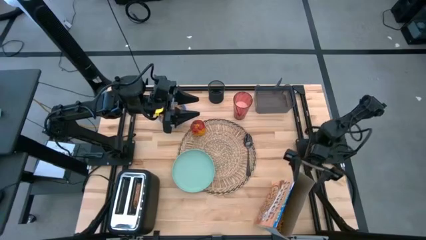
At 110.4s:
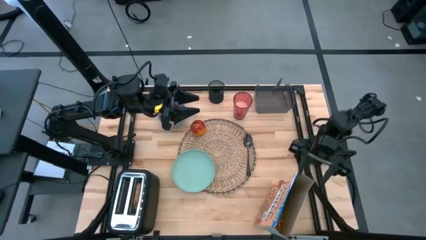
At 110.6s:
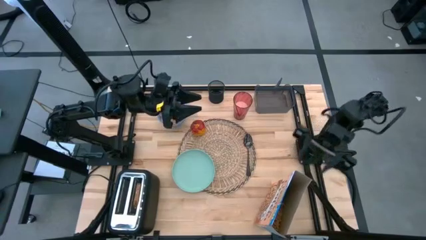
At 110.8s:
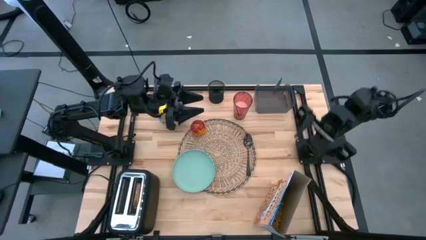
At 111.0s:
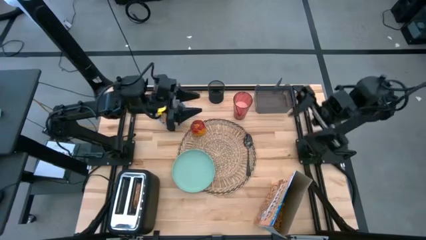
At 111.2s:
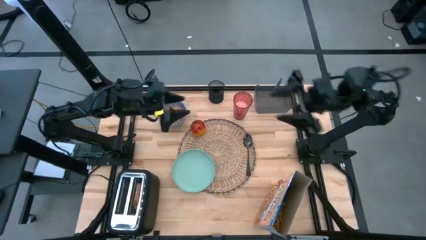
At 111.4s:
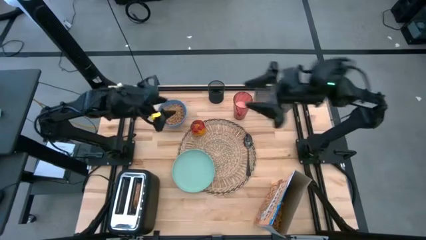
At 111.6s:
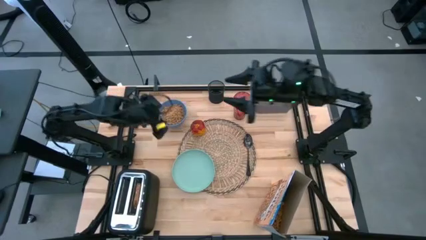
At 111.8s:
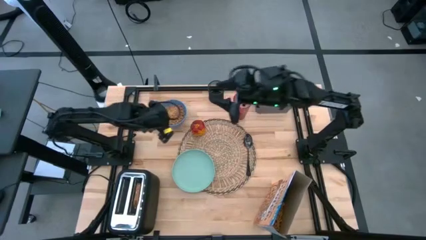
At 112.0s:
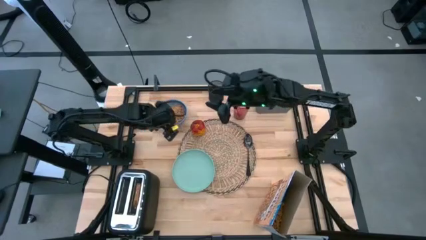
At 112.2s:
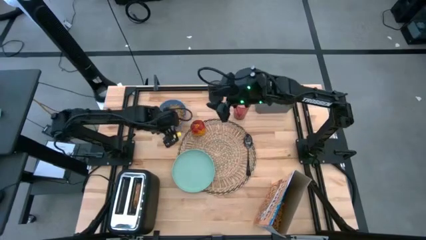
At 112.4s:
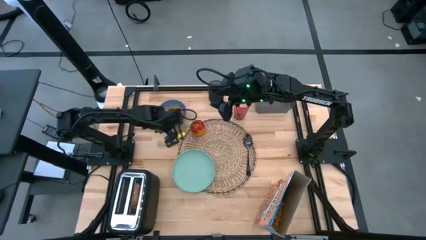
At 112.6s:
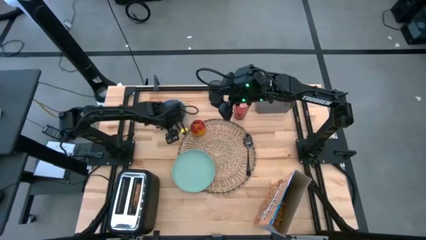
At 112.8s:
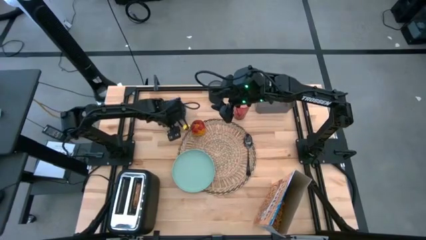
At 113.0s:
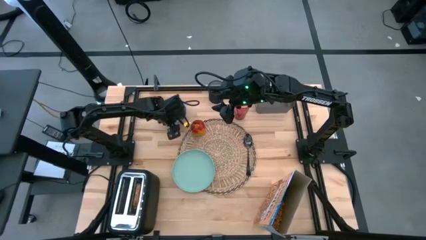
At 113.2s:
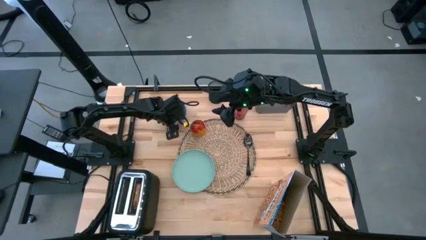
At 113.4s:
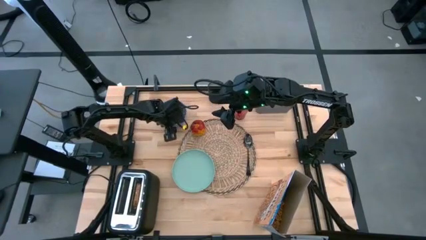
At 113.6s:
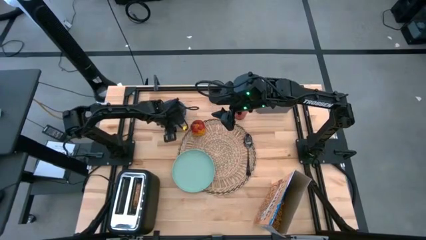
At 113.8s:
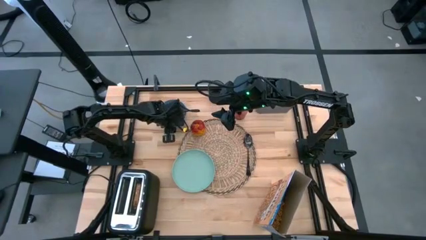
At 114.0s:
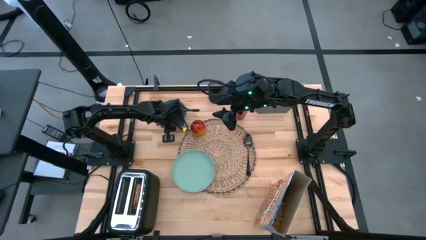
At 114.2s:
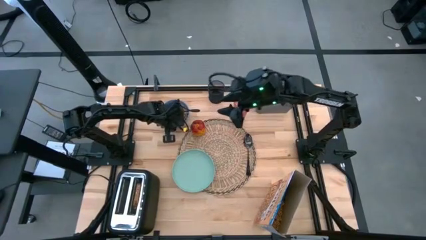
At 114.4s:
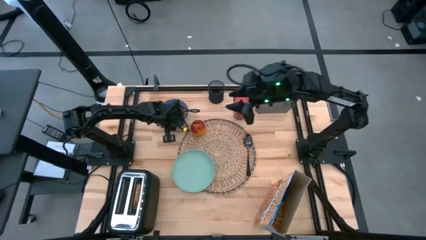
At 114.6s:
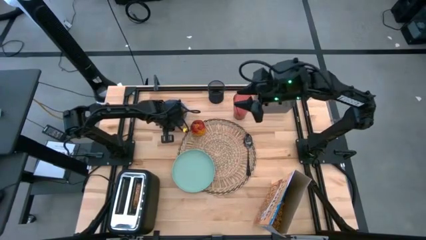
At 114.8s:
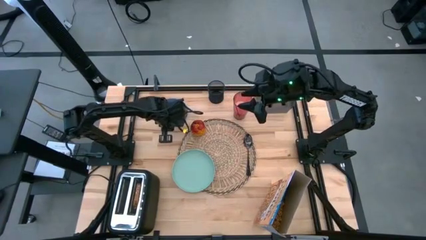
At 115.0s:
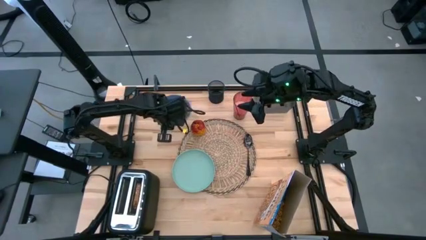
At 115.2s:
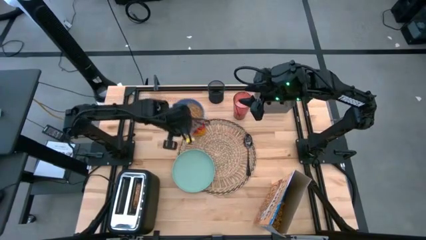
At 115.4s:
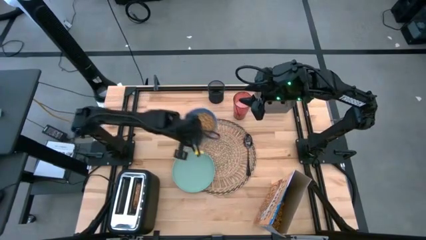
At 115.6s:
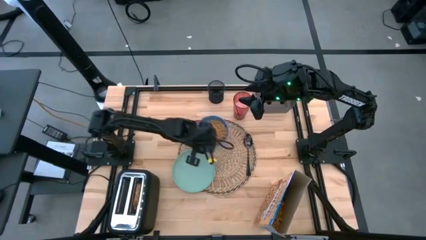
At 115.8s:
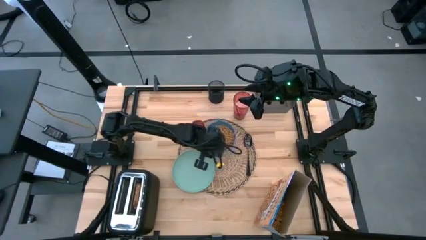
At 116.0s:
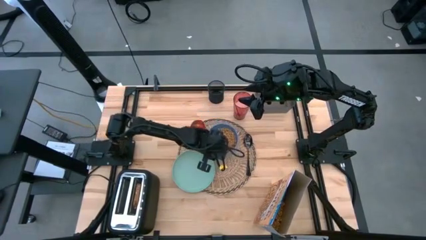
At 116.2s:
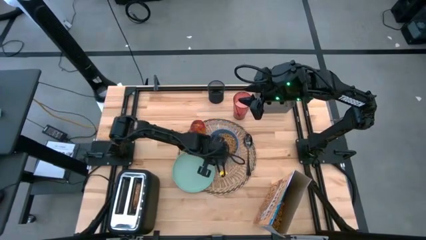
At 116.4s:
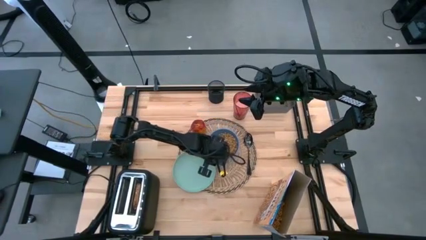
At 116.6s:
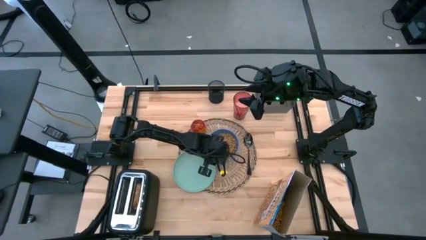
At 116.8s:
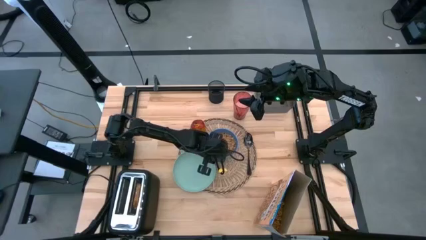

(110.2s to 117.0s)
Task: Arrange a breakfast setting
Put the blue bowl on the brown table mat

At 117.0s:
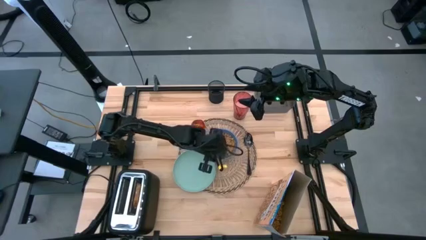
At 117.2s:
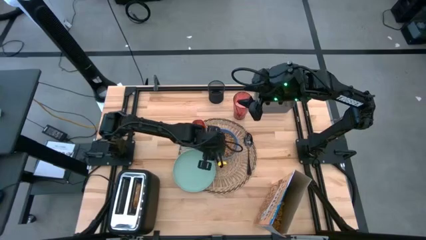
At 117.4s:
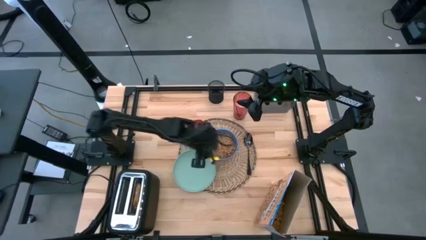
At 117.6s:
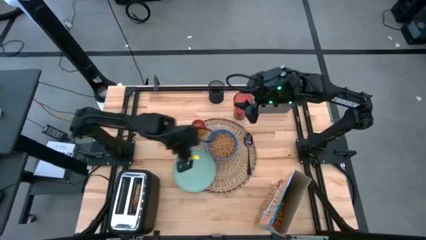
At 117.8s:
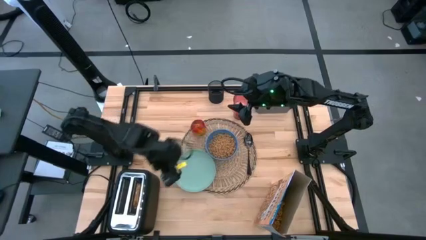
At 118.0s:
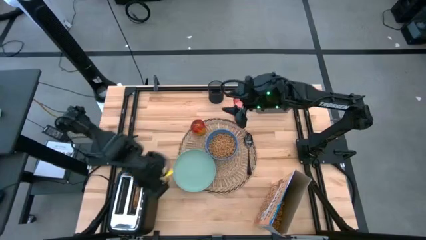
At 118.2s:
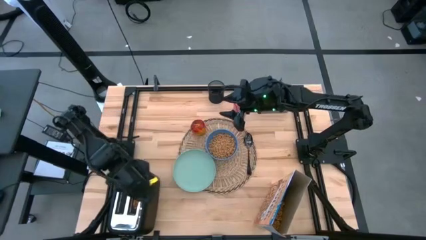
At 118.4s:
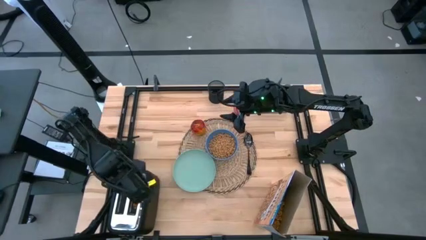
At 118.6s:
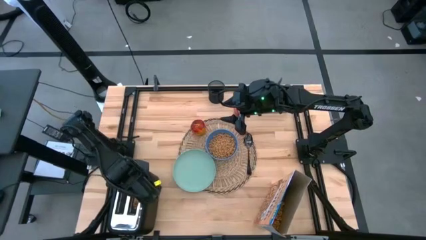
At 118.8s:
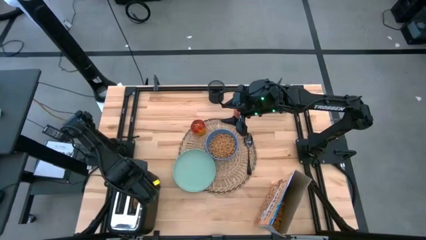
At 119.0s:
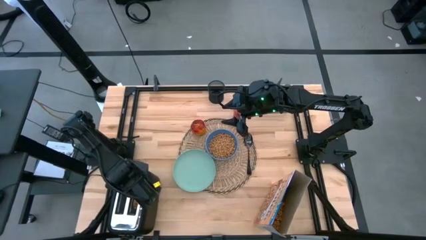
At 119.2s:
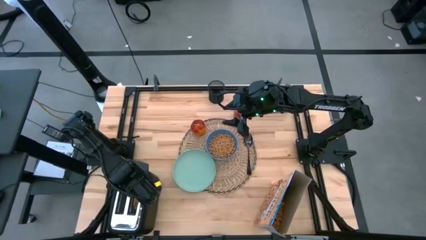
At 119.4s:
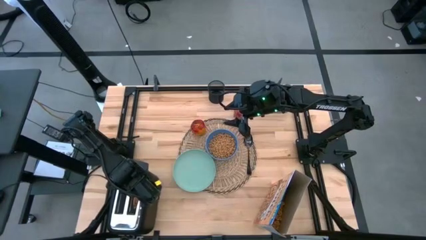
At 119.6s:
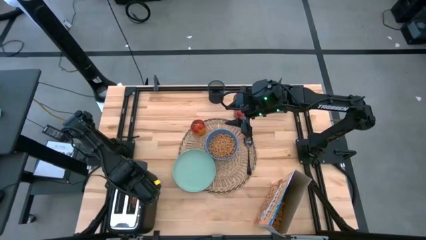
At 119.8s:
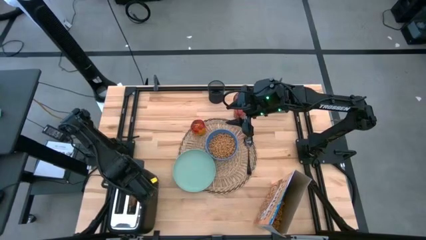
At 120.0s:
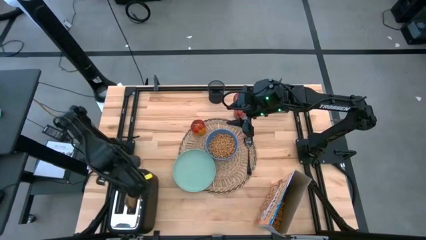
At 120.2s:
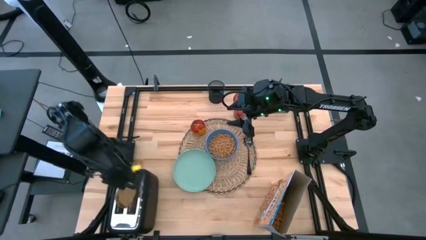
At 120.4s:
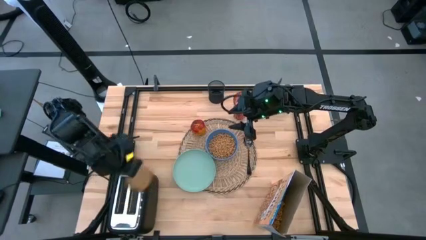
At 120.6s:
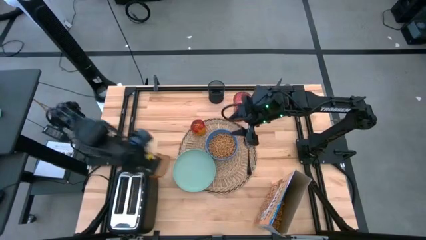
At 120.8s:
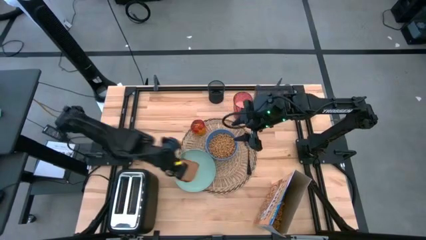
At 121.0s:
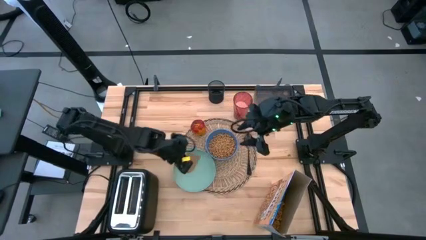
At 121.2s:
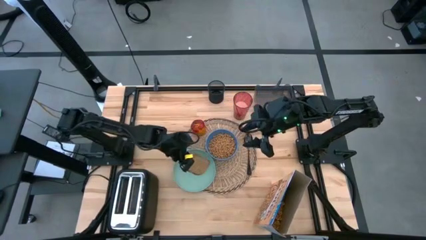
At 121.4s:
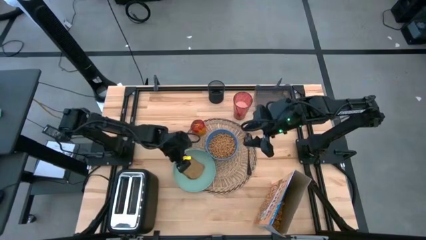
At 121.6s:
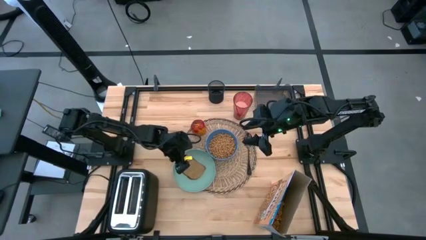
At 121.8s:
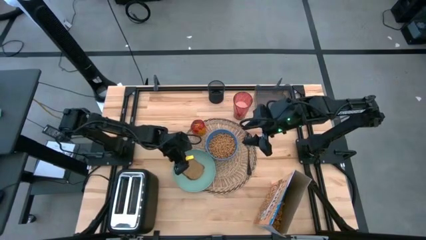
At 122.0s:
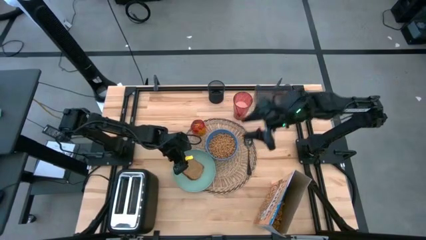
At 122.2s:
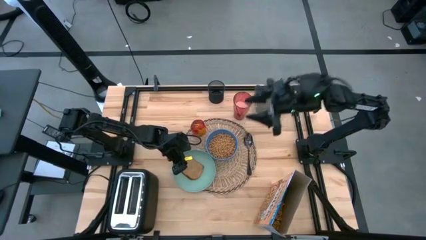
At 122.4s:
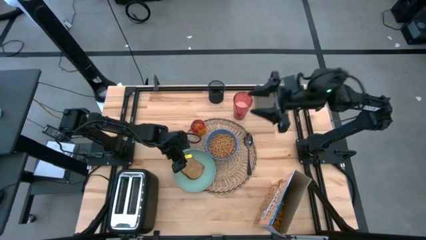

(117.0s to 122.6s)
Put the toasted bread on the light green plate

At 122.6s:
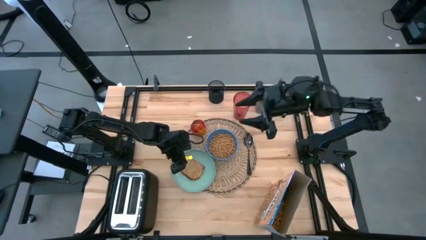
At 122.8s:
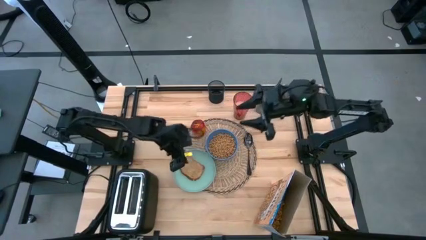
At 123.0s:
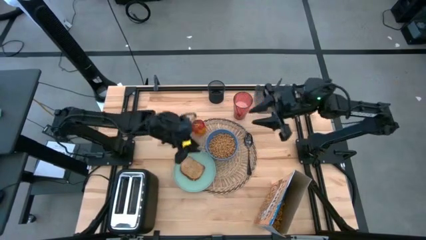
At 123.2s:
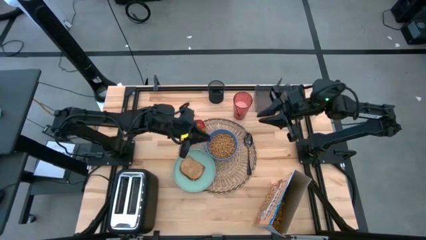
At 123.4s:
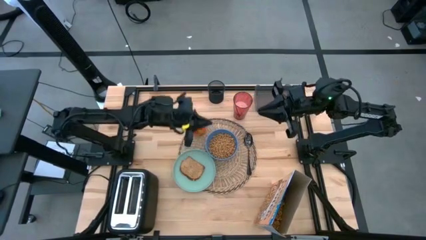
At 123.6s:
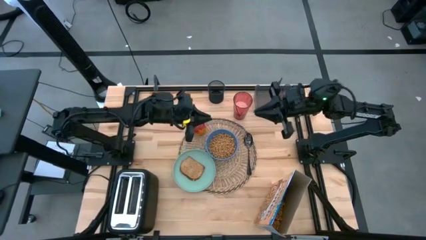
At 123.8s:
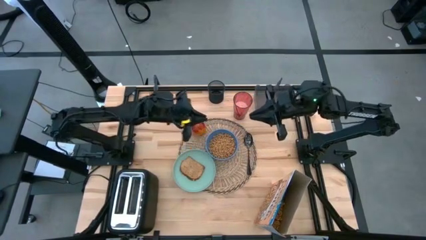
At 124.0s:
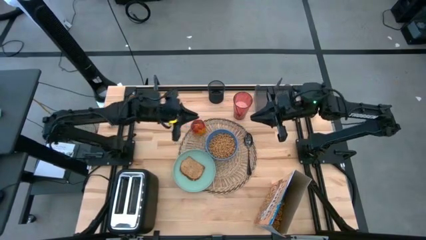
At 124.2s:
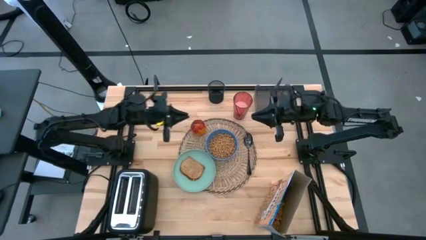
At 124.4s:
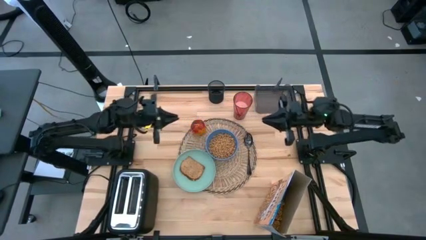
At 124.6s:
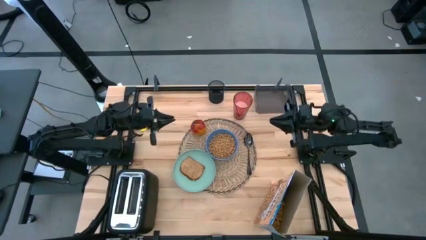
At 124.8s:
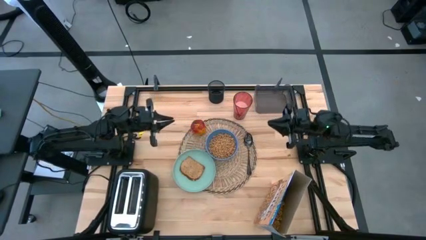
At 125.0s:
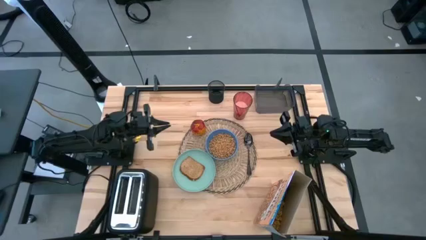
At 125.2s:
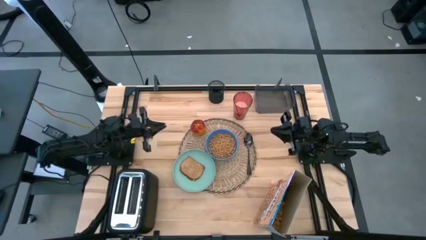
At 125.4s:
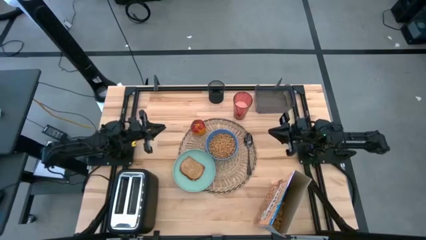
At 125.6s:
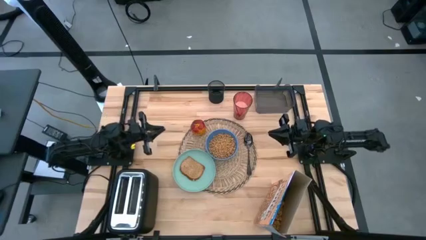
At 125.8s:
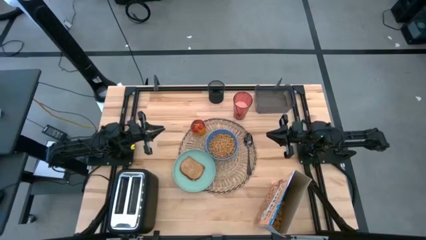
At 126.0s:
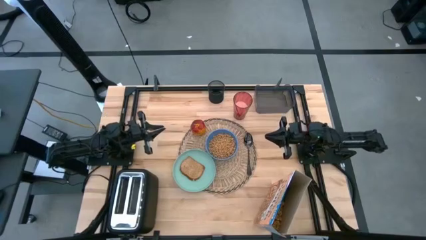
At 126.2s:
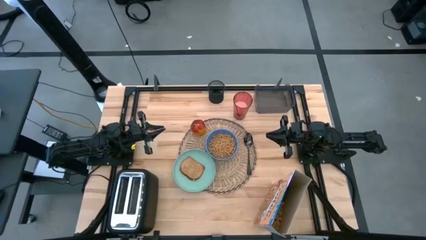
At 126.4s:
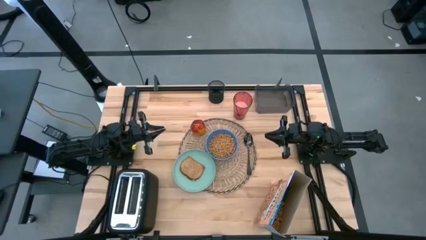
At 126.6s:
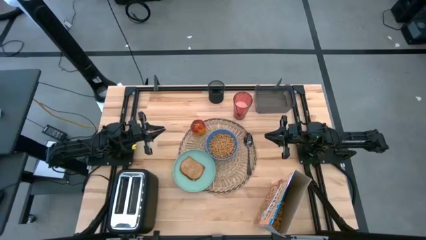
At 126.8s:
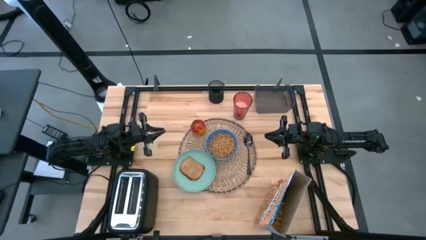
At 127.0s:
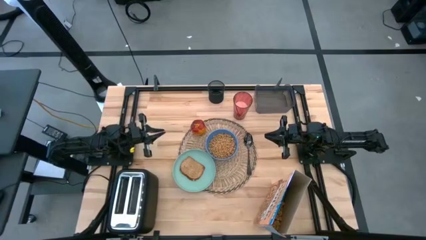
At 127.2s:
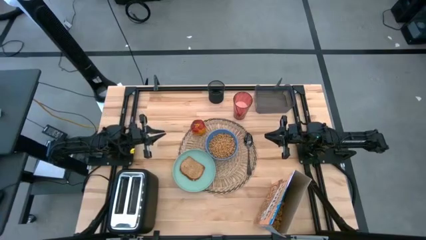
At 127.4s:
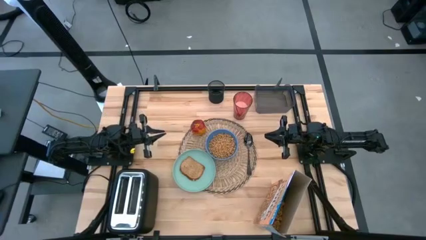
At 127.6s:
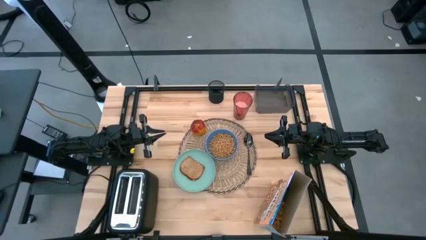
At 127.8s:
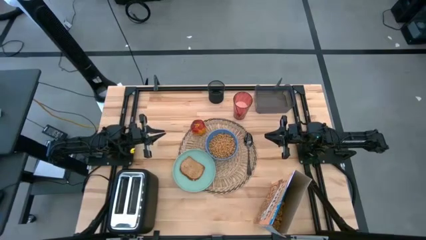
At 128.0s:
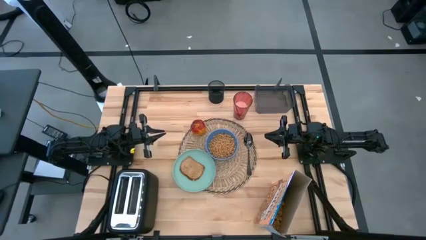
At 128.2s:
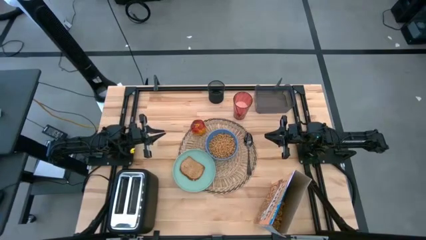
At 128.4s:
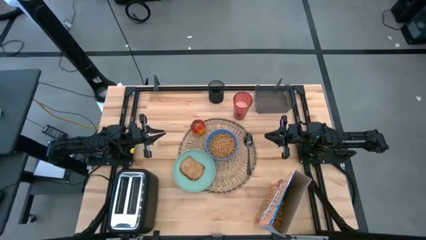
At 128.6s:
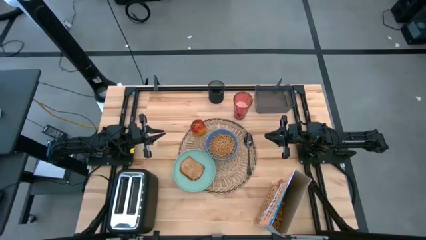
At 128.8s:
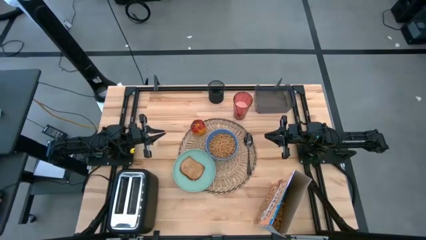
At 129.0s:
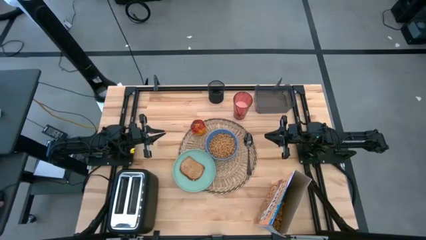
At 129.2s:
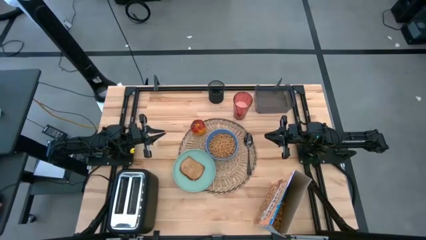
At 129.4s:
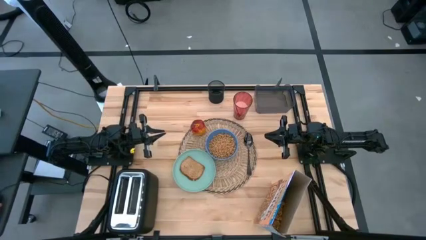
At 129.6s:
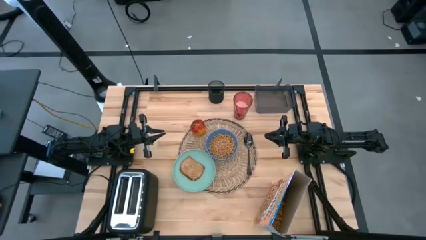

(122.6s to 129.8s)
Return to Home Position
